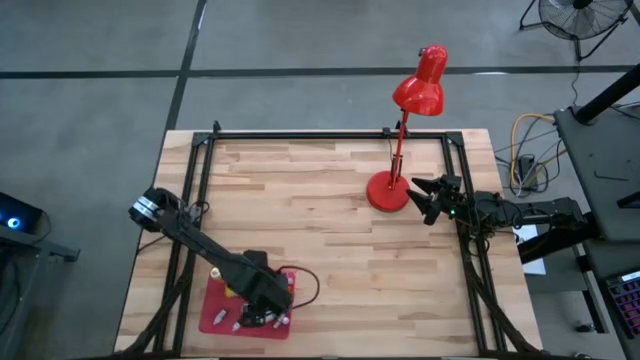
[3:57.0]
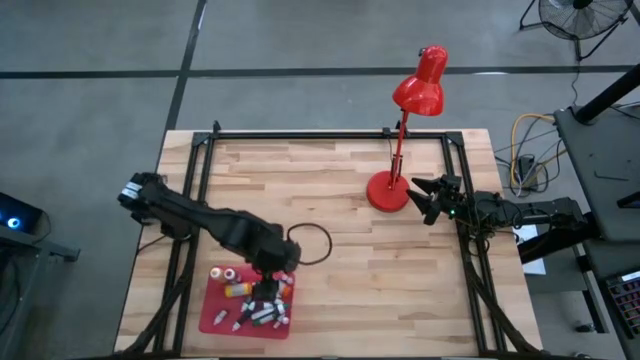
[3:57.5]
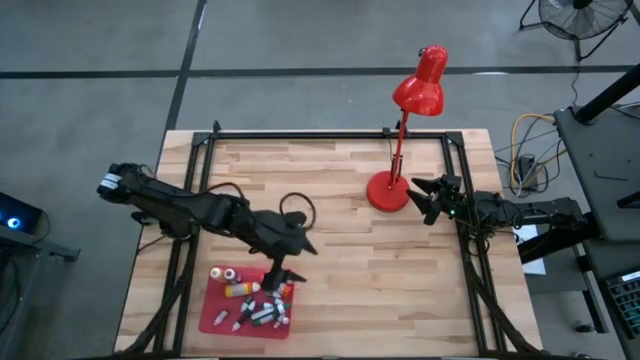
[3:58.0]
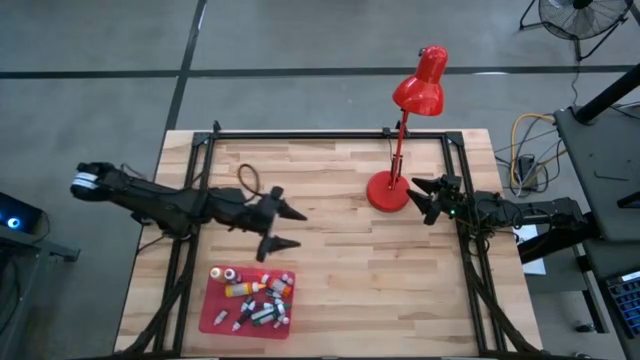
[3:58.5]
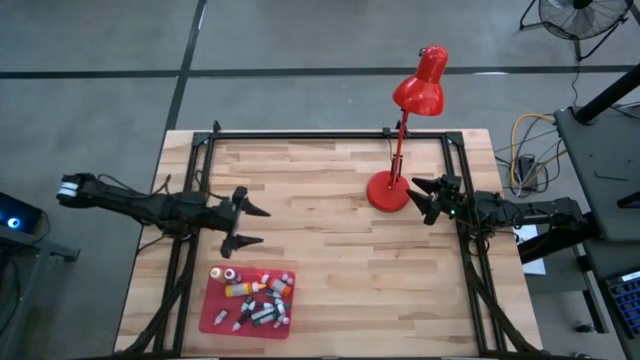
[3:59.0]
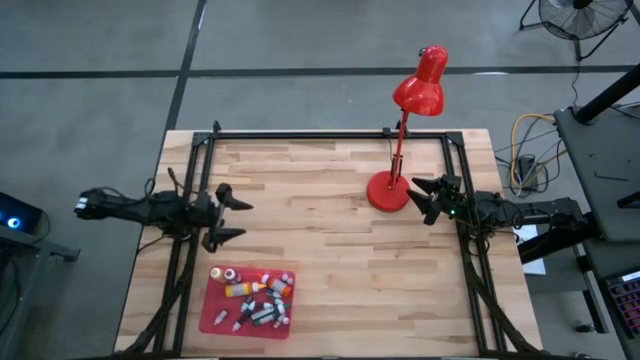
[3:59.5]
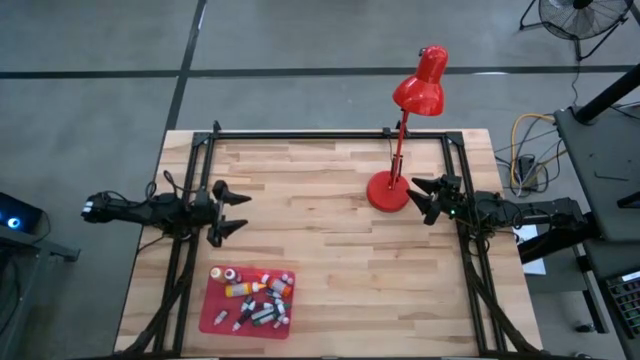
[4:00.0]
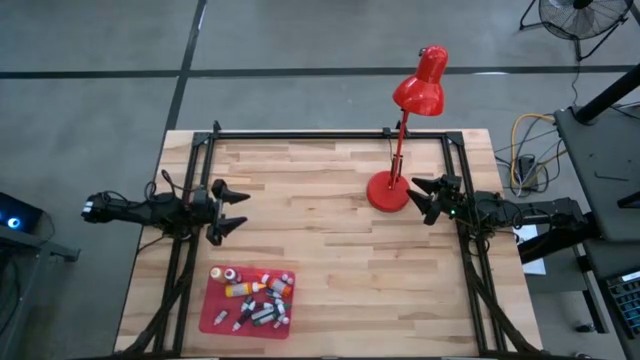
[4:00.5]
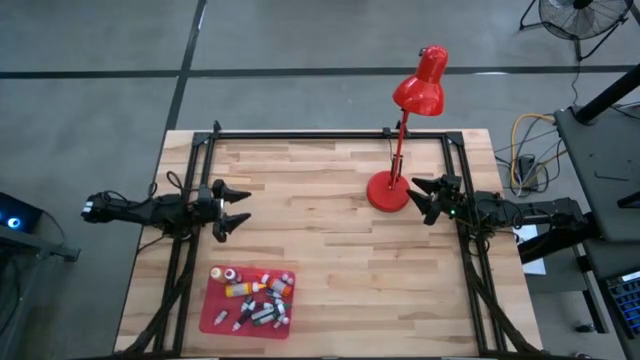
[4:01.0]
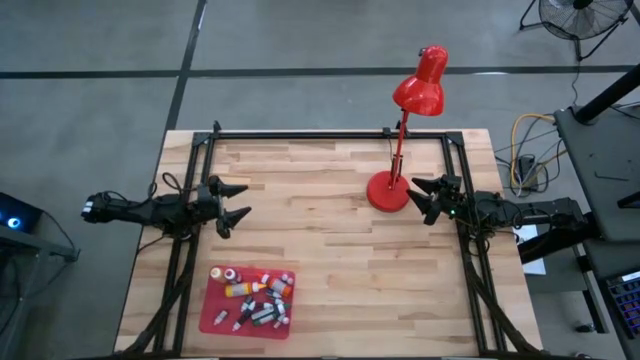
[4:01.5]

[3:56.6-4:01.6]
Task: Pick & Place food coloring
Return to Home Position

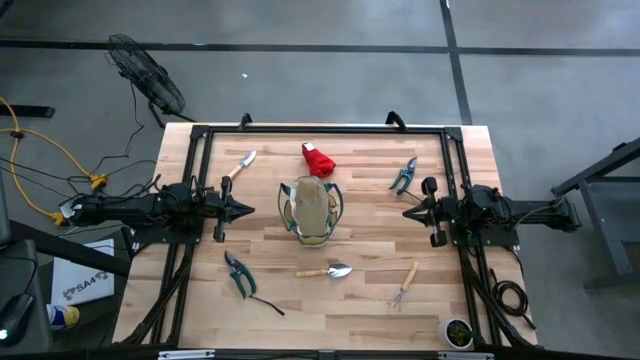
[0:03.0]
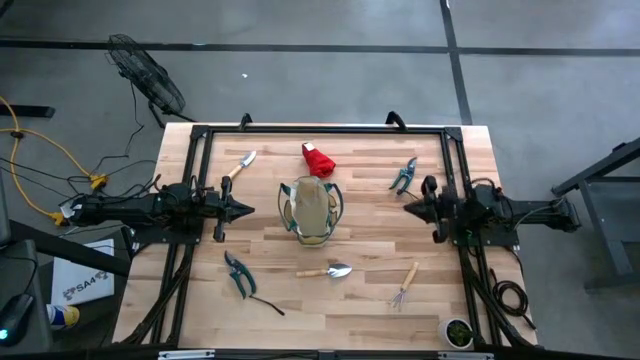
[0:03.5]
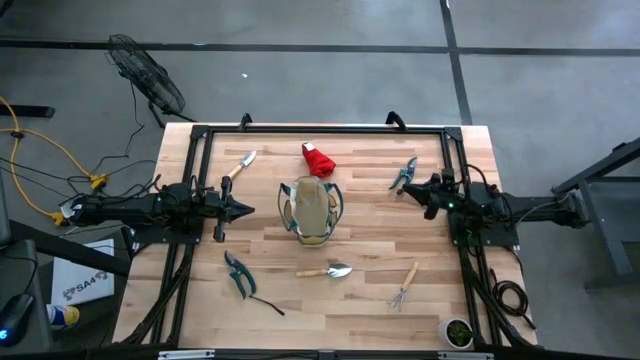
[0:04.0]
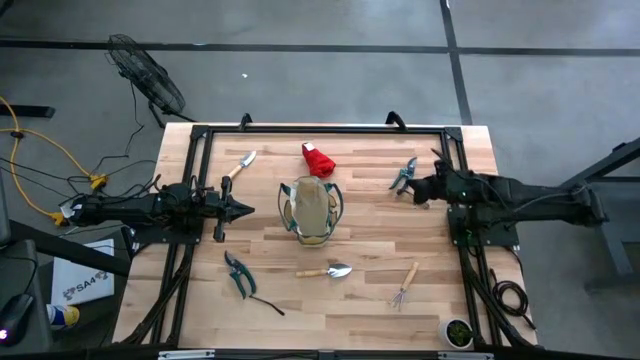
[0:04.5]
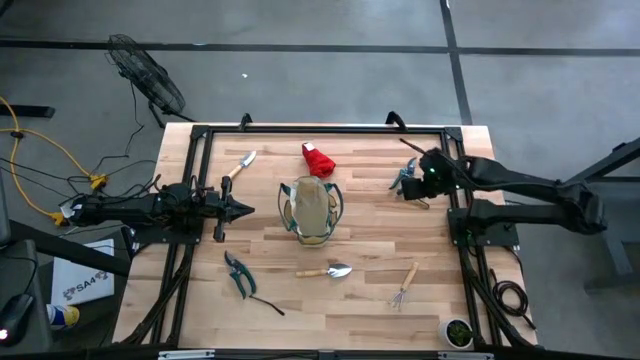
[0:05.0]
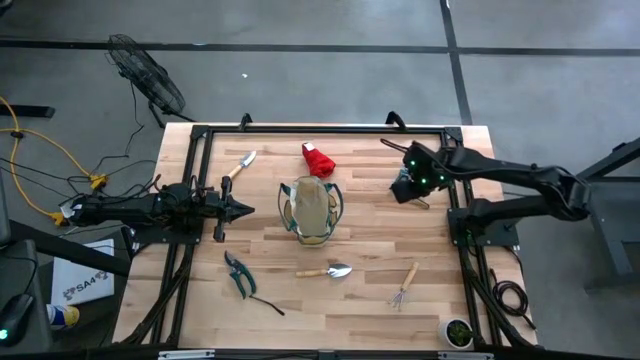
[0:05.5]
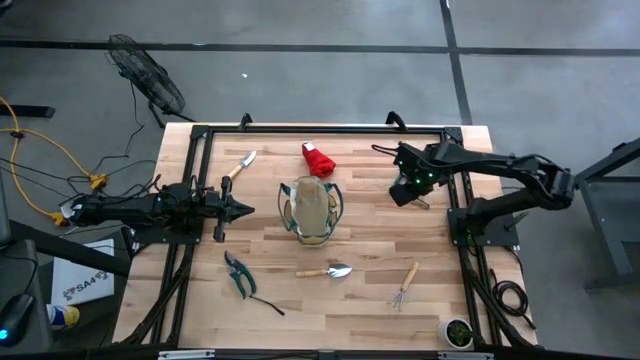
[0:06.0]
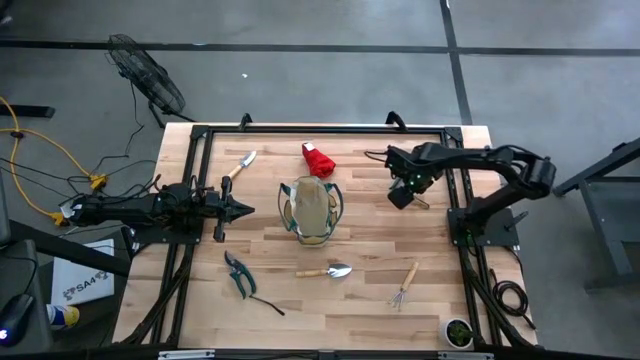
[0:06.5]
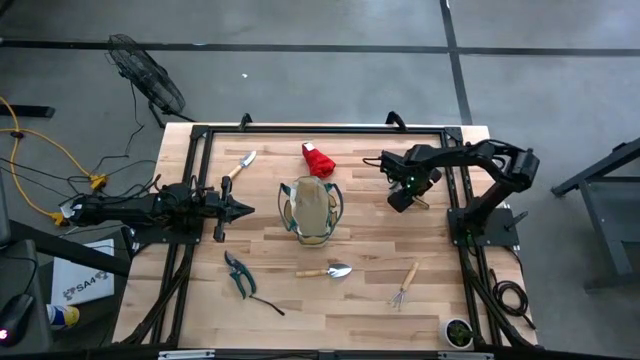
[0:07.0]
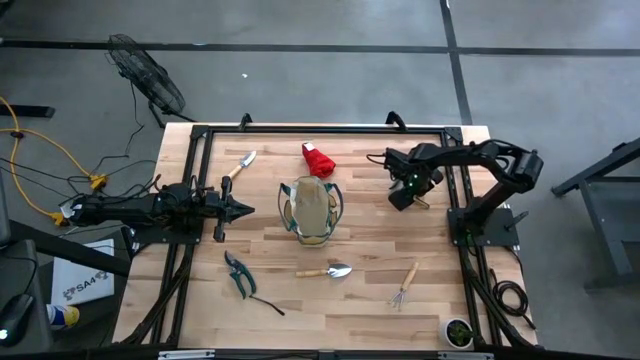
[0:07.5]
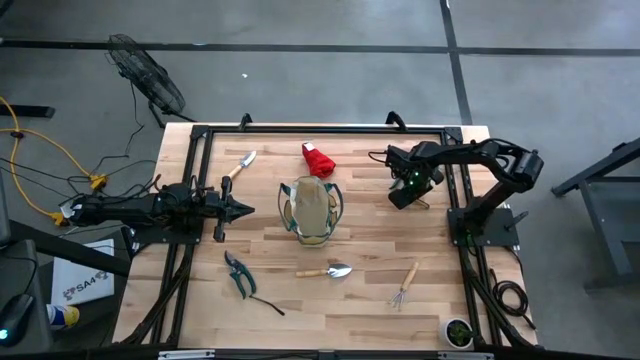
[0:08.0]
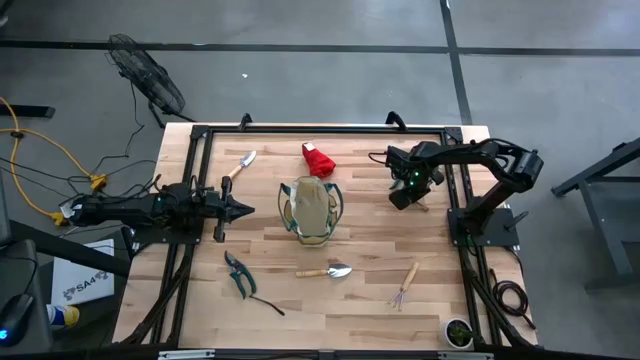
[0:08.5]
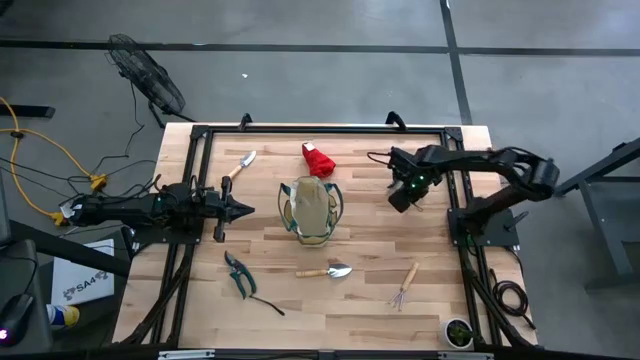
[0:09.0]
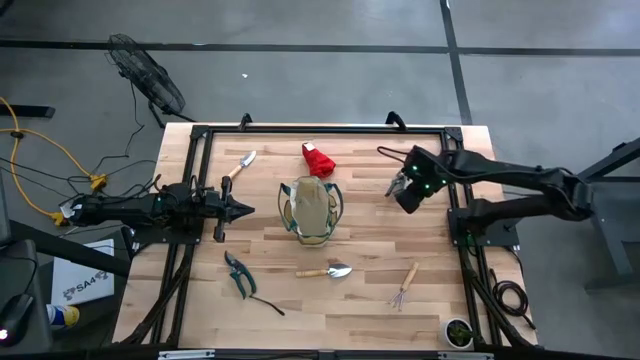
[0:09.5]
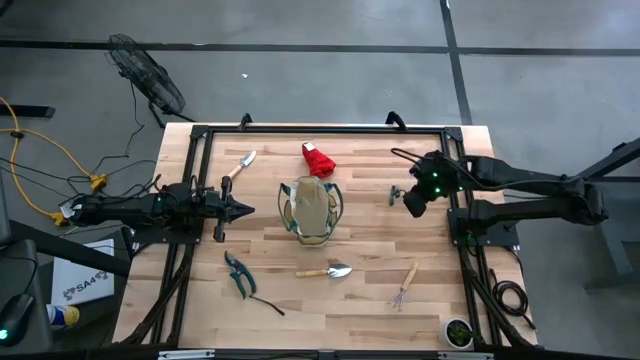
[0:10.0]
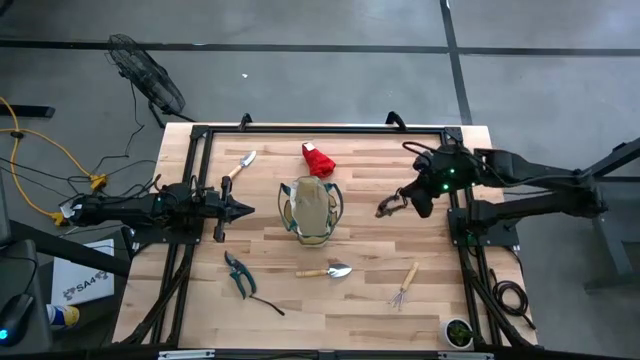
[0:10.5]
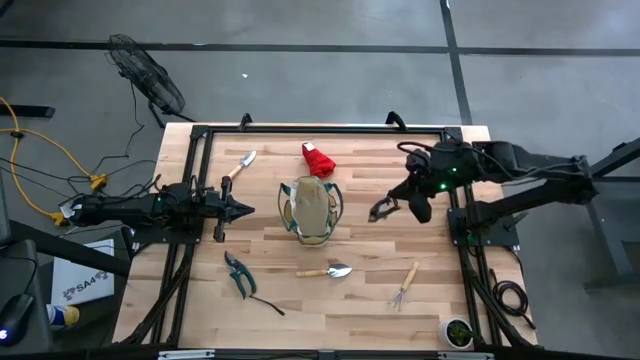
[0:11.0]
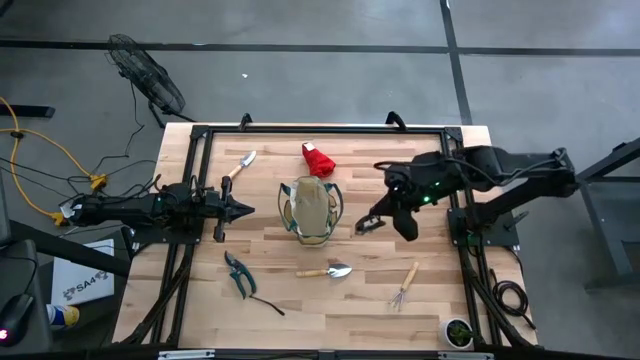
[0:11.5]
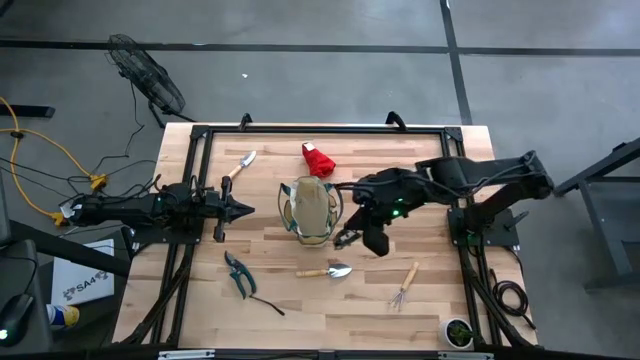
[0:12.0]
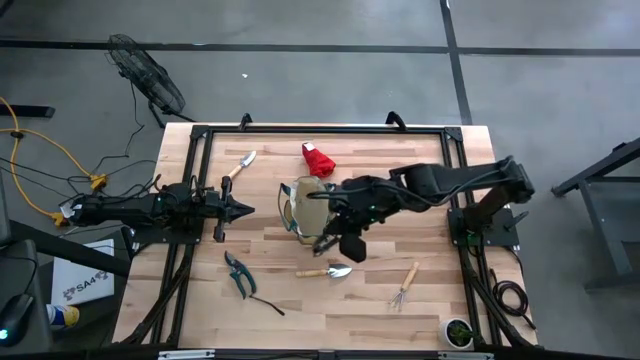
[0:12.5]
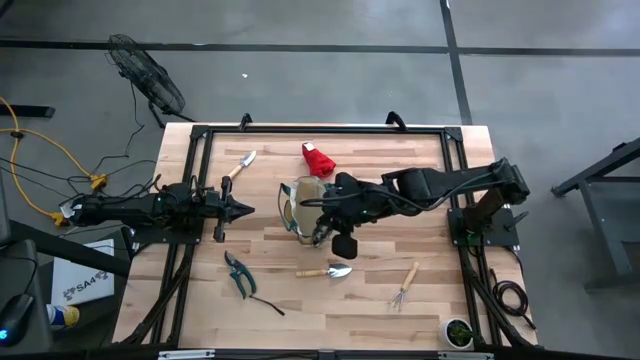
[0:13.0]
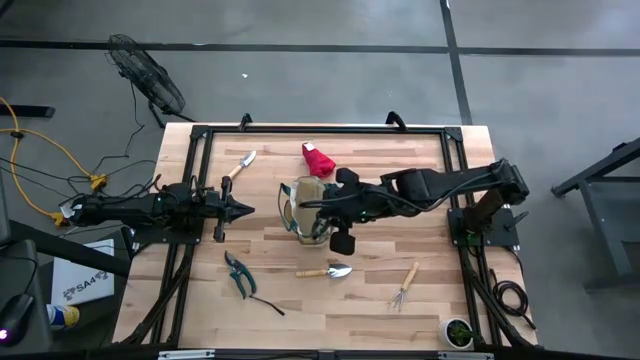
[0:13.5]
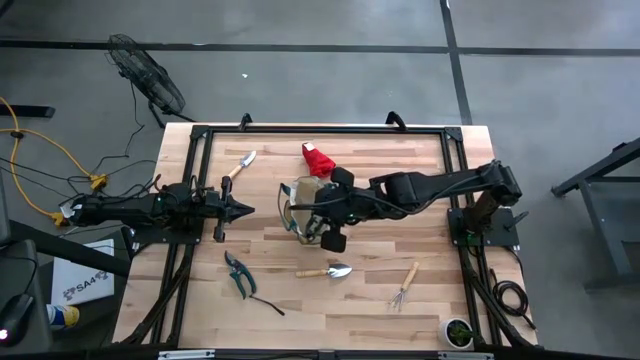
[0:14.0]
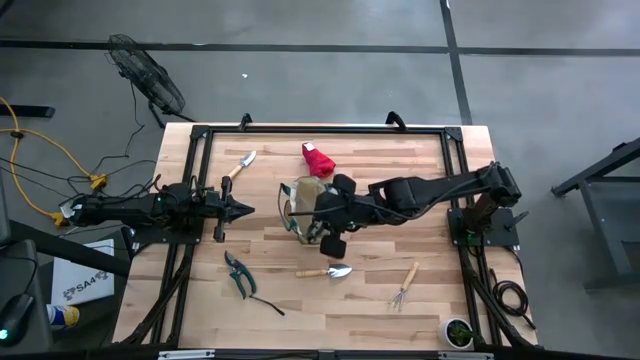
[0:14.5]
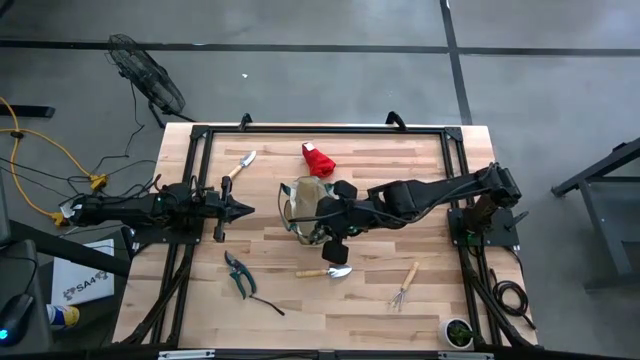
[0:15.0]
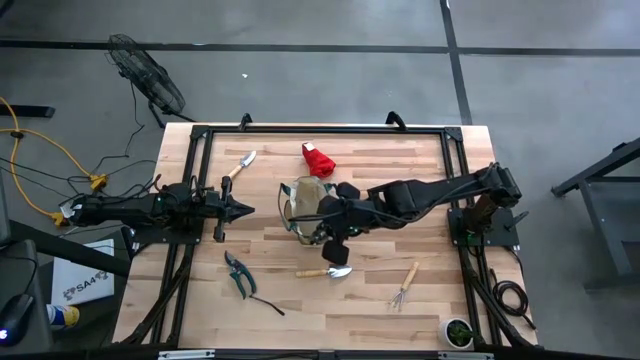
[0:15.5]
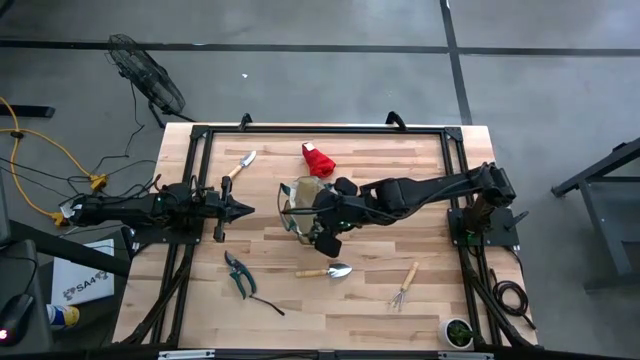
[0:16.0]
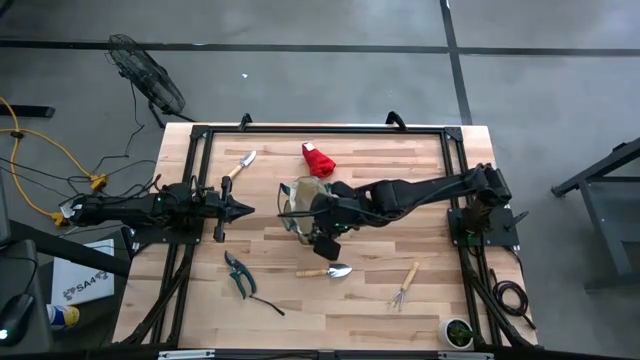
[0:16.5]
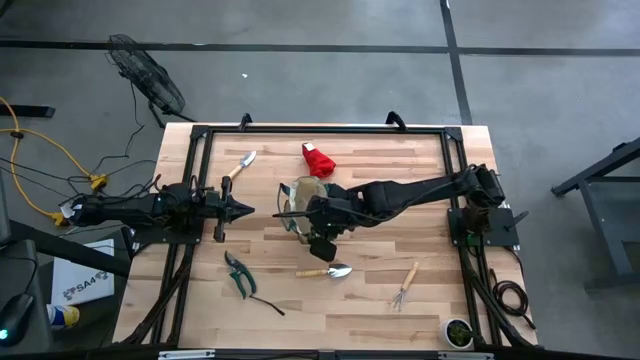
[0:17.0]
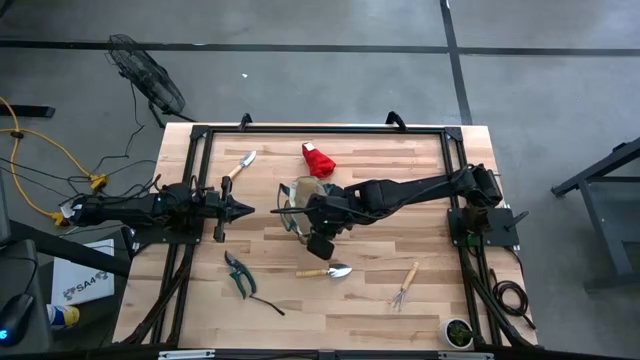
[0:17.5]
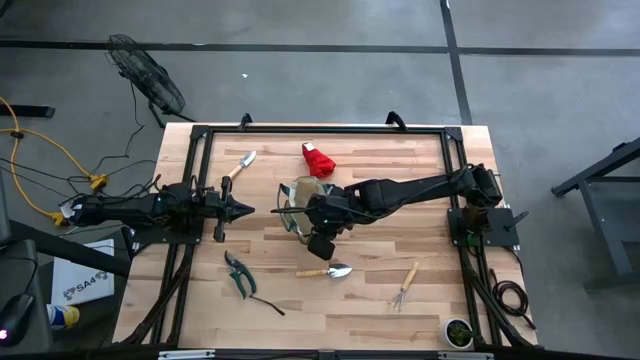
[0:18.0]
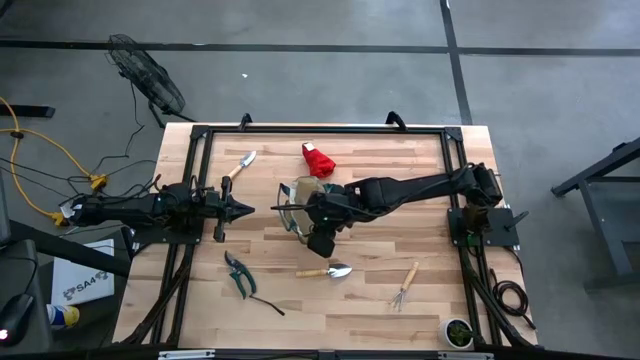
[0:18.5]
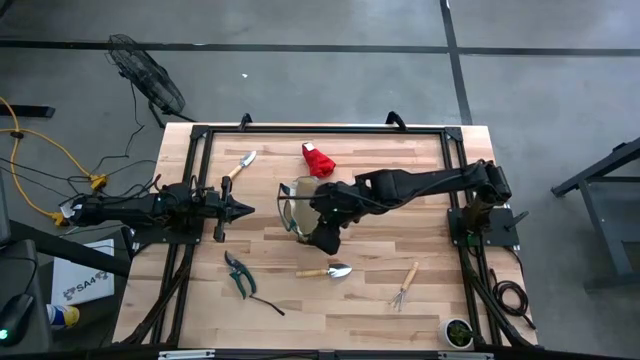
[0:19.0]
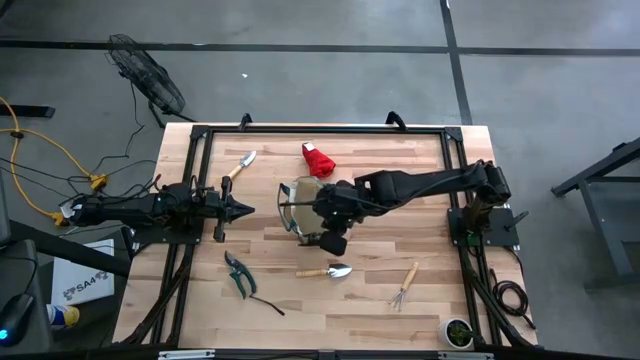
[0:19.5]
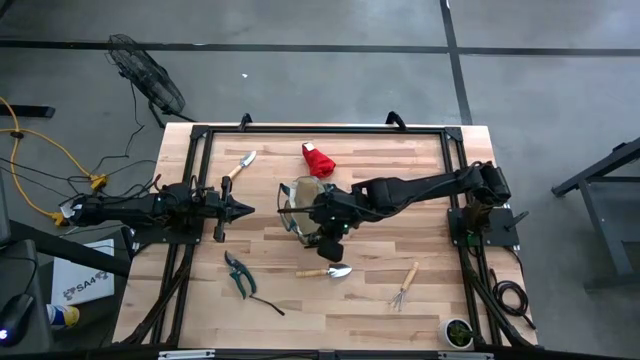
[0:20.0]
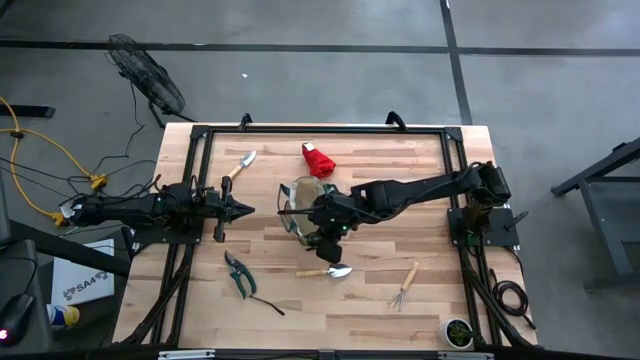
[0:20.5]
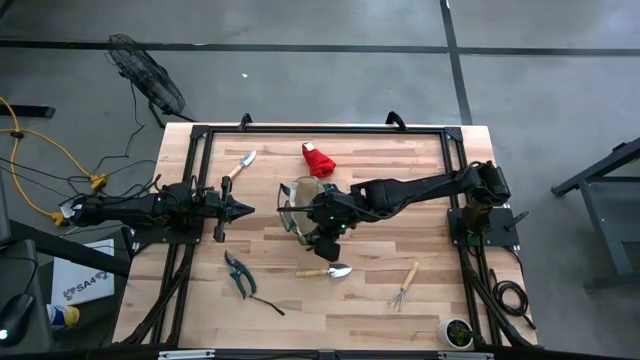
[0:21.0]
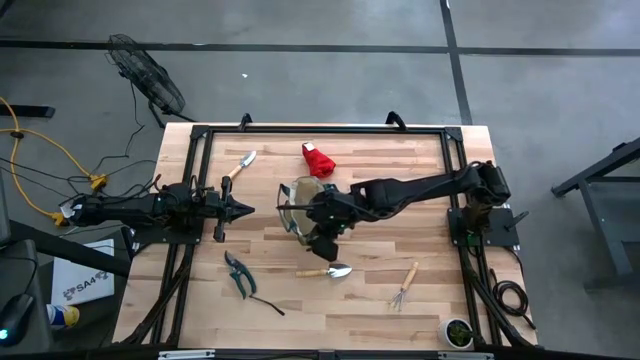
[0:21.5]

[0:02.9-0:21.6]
Task: Pick & Place Garden tools in Gardening bag
Put the green shears into the brown gardening bag
